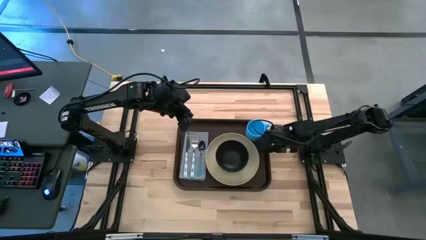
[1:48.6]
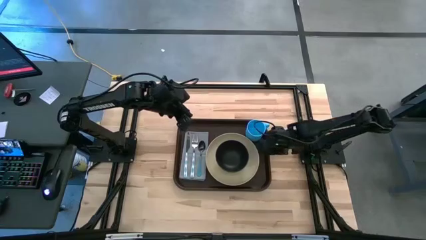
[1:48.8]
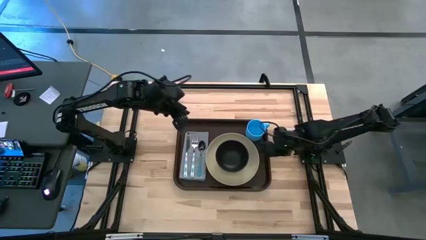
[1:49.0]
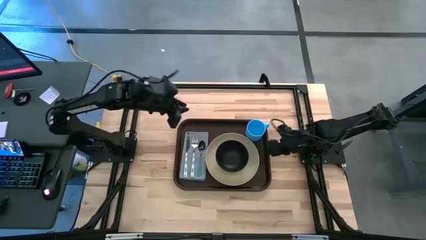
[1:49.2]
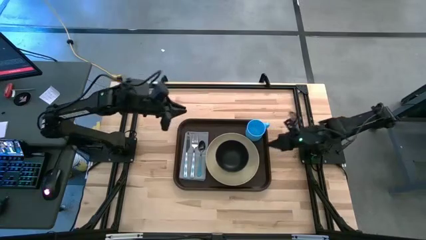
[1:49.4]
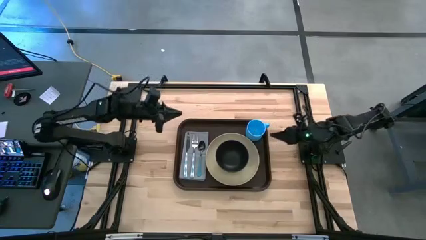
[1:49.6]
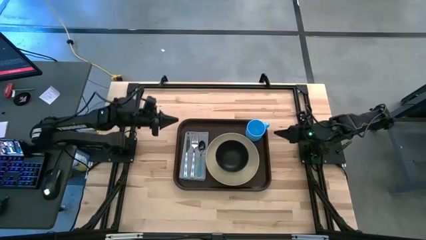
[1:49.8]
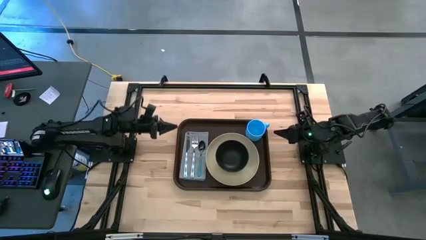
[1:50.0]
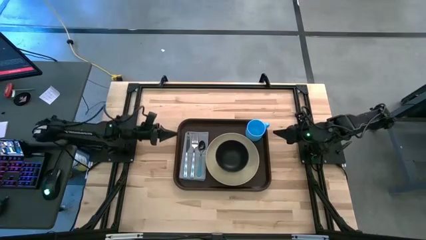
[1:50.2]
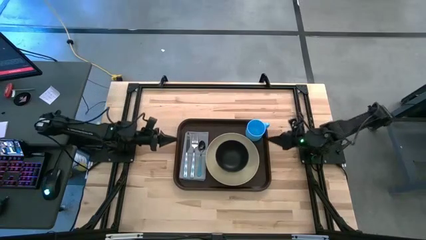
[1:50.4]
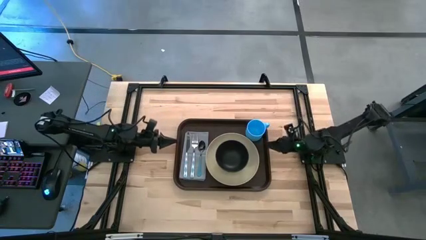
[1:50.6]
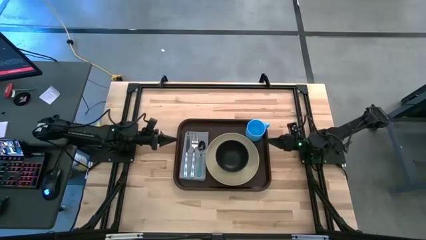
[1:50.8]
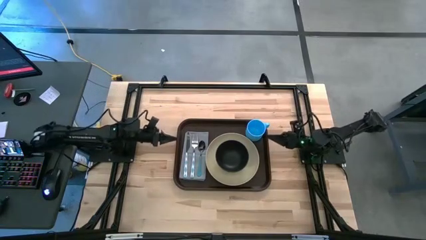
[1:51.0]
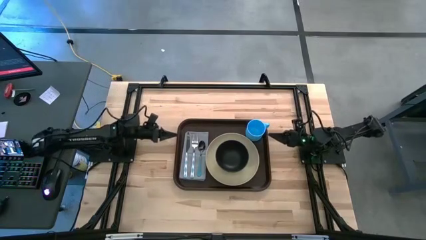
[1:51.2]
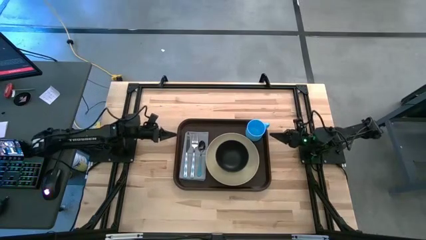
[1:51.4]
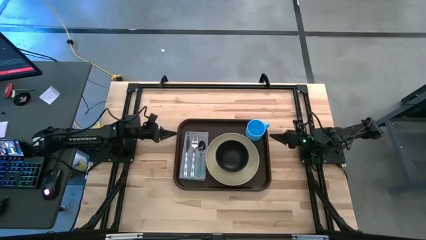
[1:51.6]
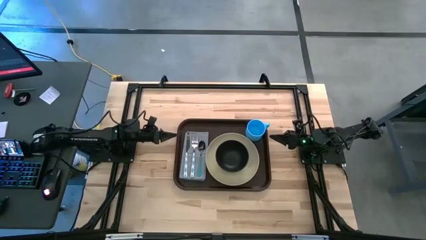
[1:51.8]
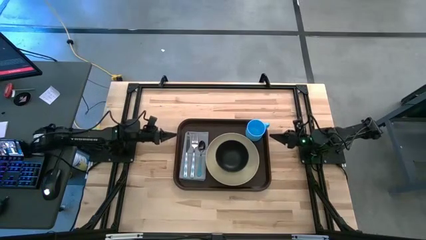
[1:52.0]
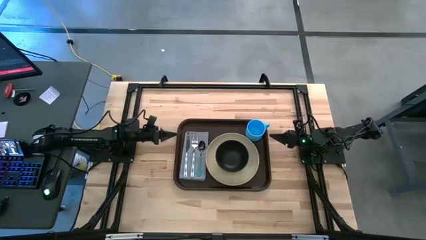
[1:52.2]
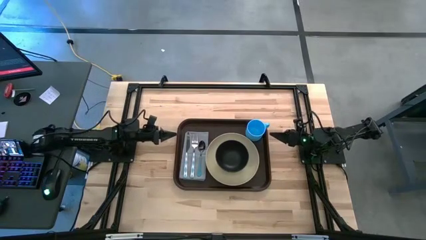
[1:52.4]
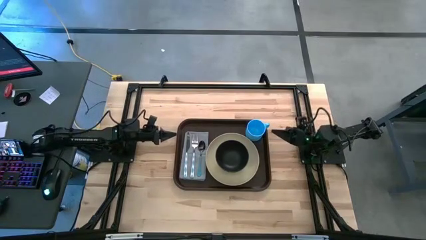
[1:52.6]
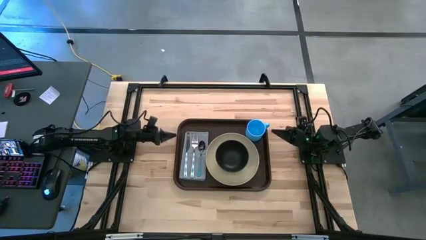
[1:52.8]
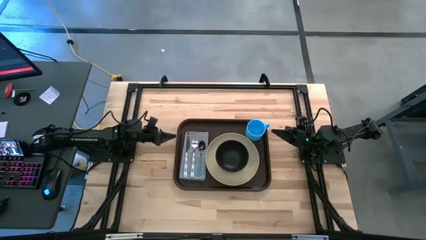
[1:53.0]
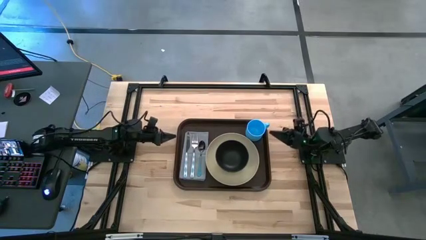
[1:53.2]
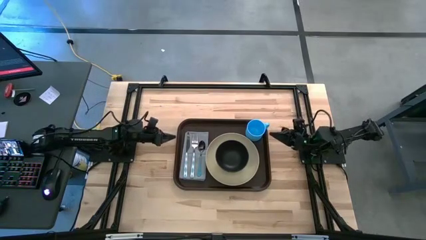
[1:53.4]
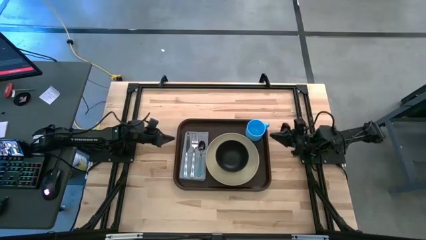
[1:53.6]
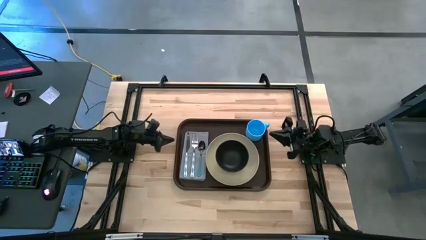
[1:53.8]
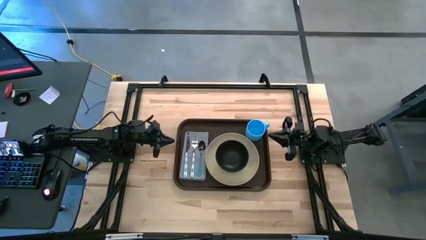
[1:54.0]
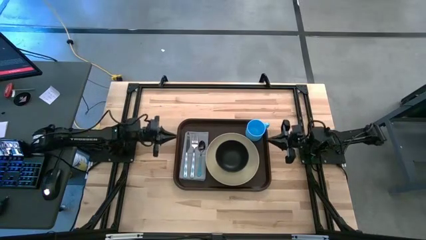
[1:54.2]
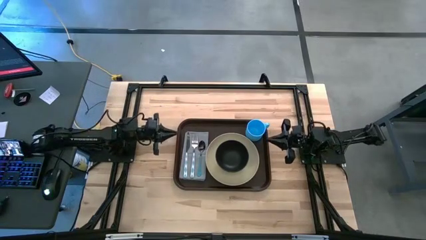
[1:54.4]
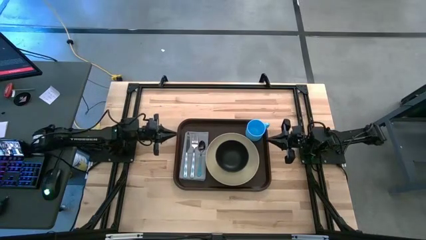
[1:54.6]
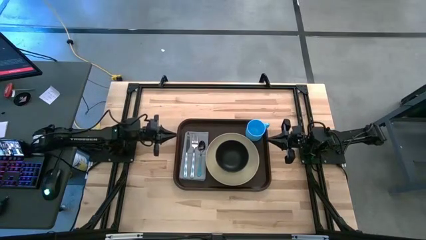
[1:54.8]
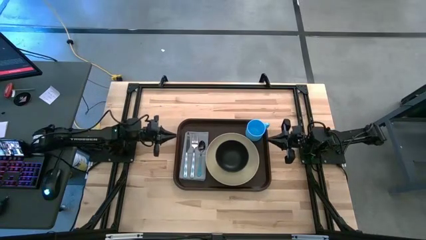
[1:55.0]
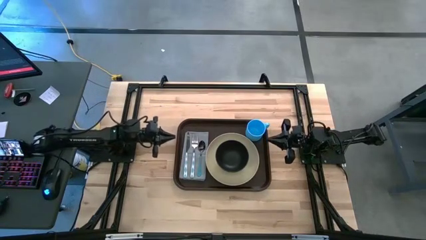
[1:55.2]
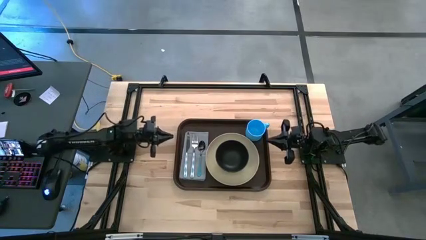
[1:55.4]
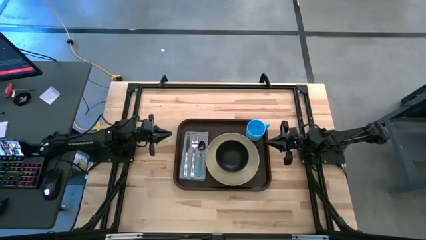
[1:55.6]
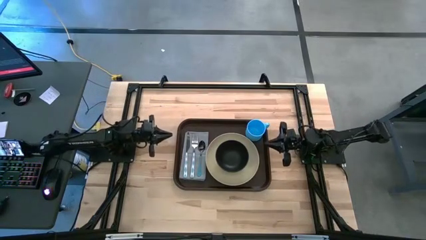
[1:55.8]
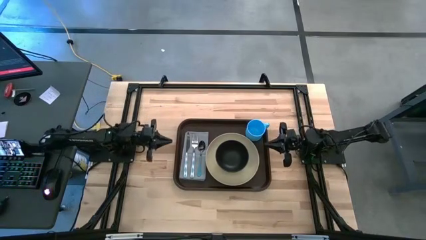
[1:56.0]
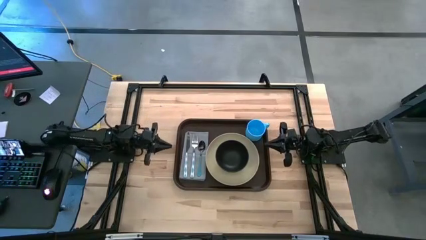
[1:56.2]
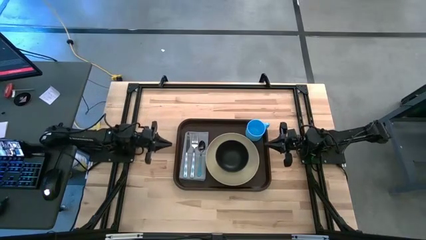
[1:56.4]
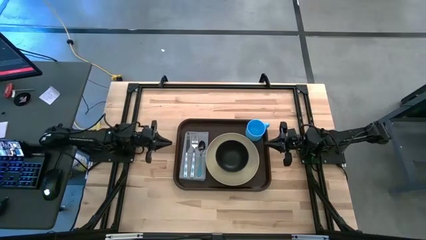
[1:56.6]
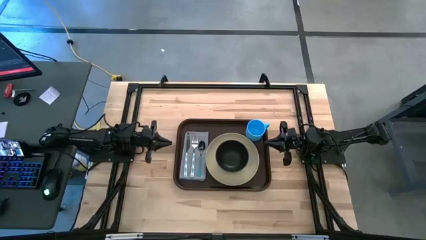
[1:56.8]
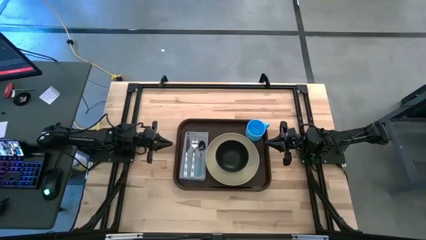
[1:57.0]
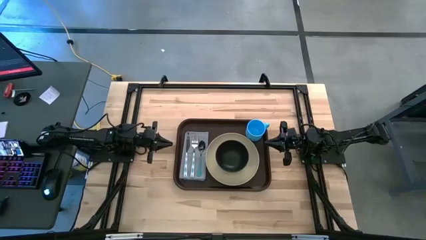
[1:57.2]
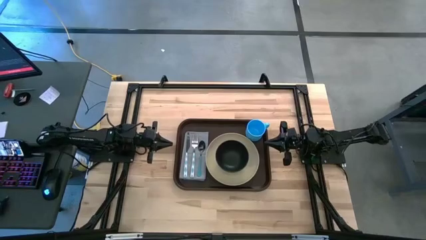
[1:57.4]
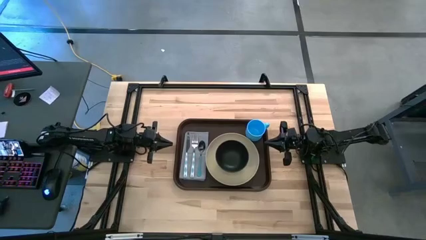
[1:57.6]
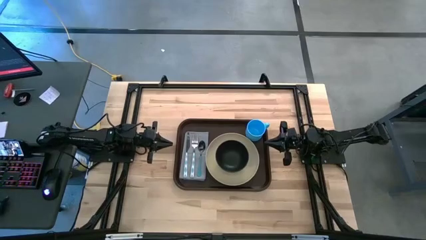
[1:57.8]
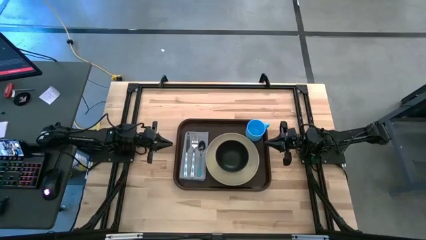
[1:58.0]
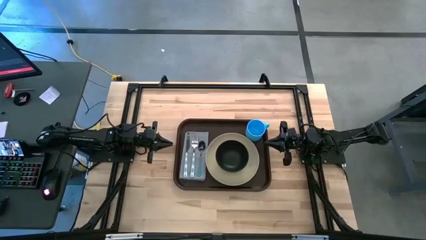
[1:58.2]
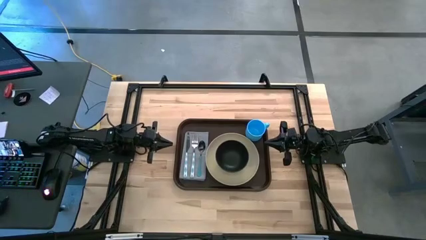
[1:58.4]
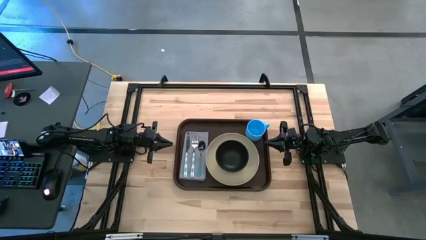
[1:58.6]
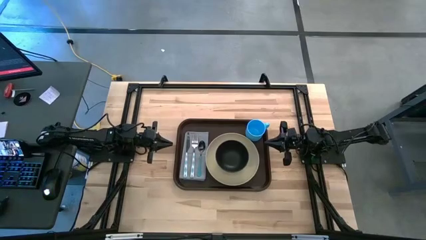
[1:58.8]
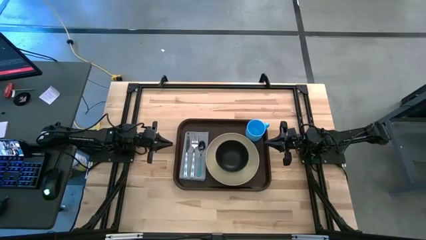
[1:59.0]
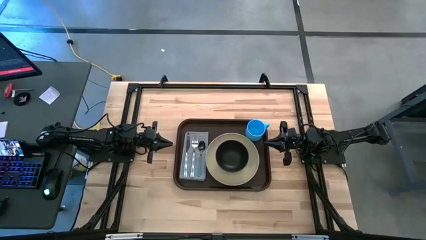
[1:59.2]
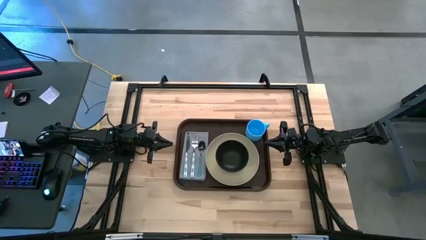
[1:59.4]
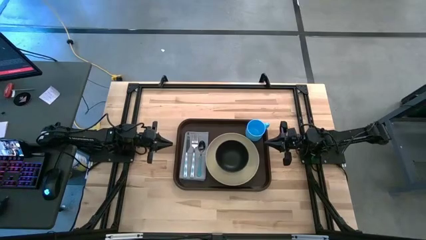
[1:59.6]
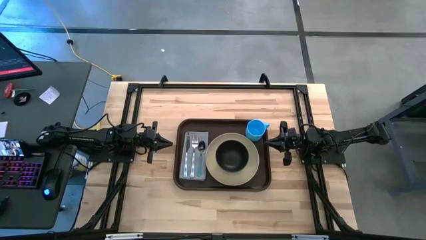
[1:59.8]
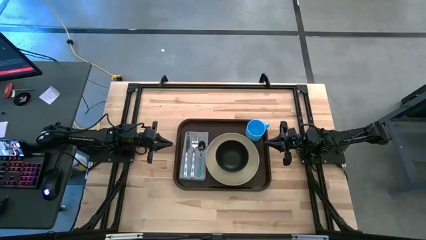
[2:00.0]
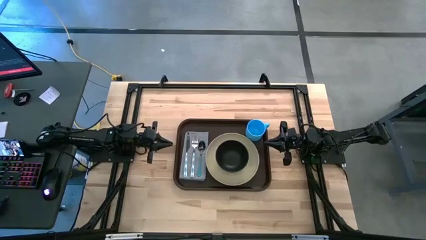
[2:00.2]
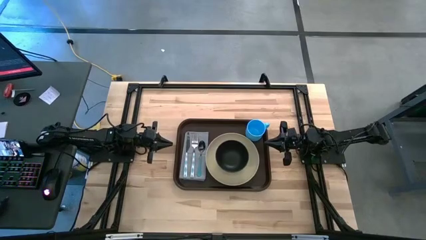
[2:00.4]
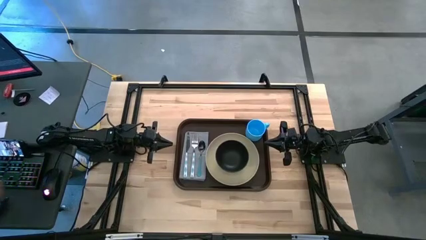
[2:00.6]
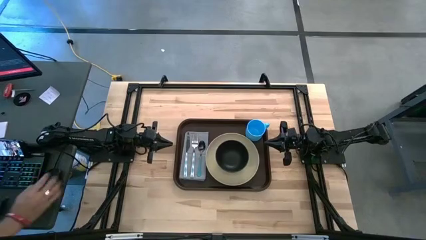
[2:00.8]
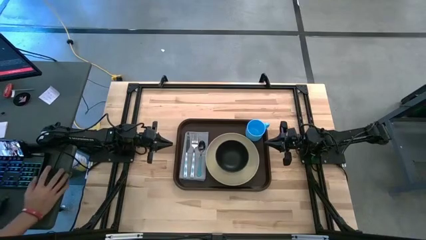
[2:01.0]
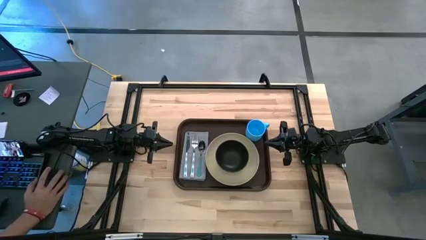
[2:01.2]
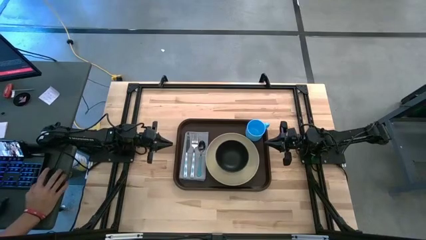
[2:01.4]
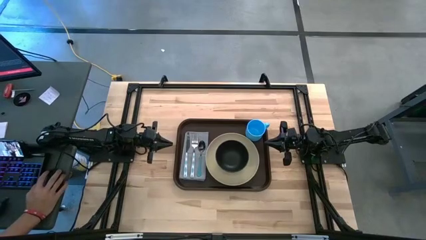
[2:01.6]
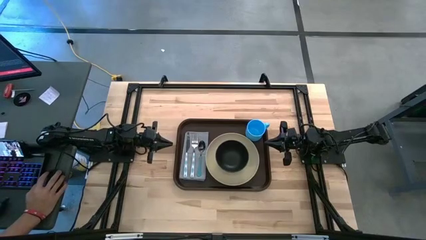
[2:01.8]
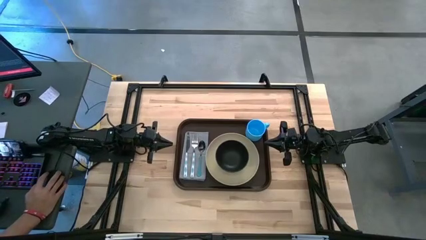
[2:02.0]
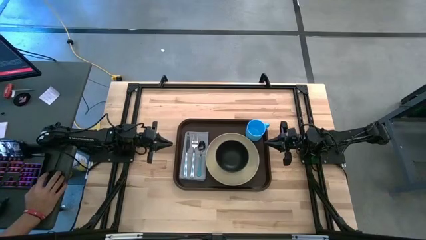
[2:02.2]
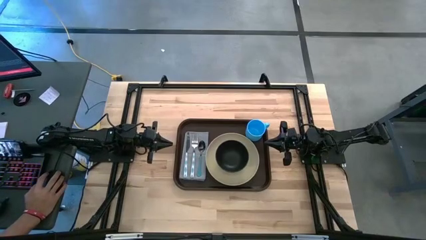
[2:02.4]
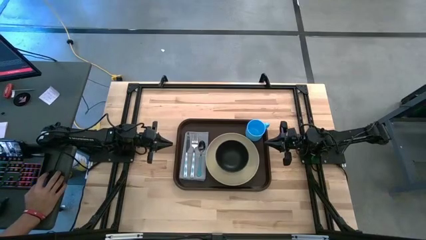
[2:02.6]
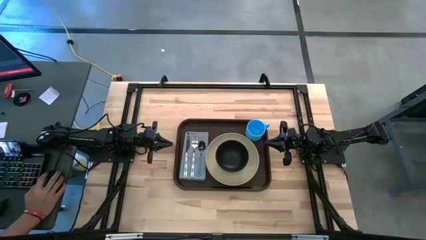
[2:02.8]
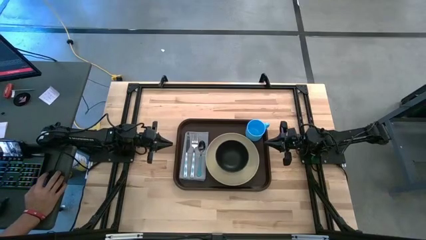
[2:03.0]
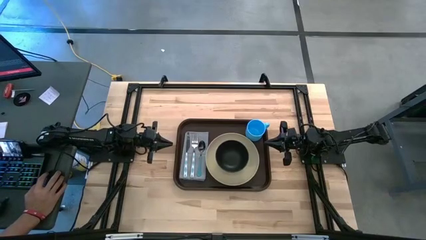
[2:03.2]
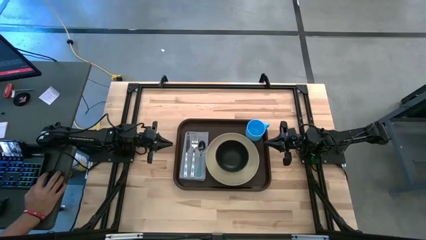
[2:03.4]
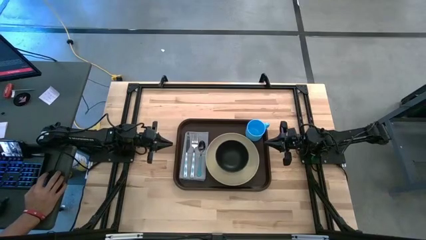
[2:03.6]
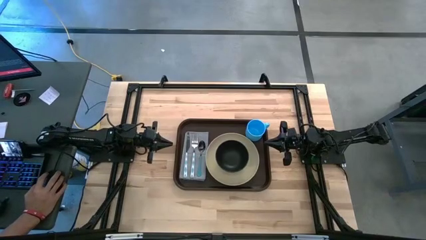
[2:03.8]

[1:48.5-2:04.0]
Task: Set up tray
Return to Home Position
